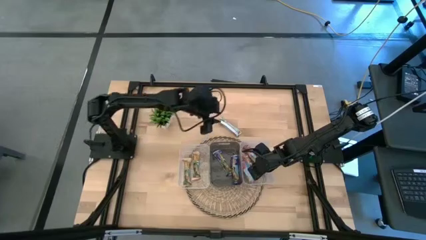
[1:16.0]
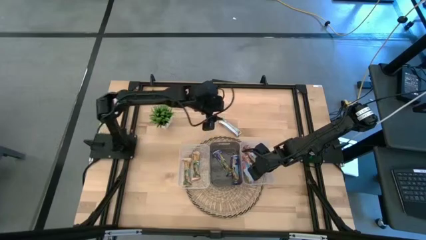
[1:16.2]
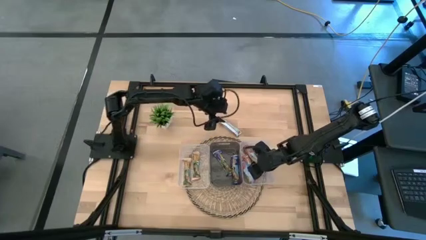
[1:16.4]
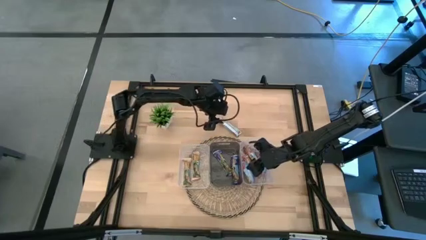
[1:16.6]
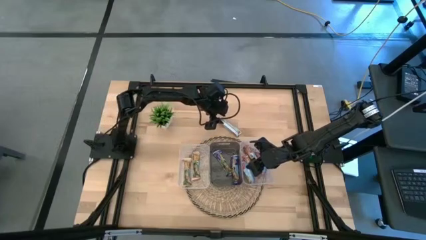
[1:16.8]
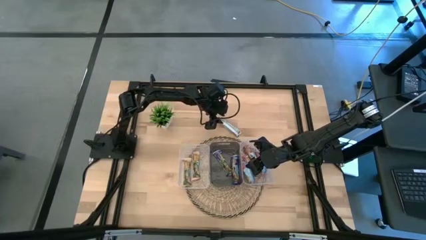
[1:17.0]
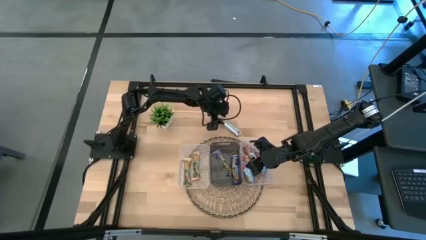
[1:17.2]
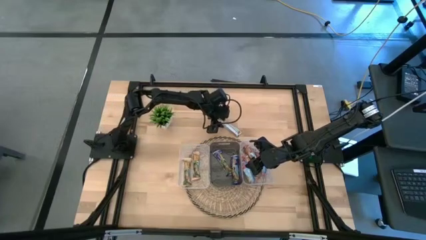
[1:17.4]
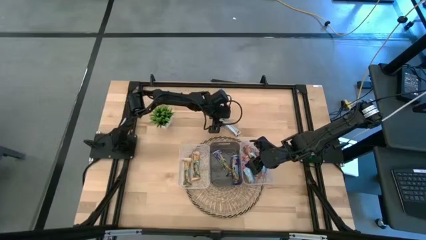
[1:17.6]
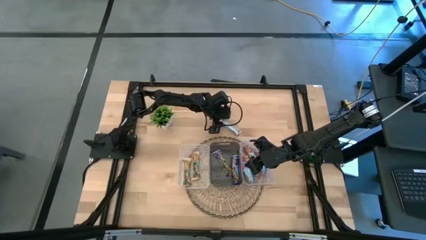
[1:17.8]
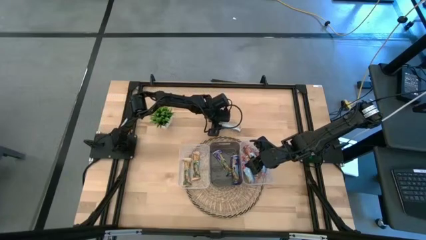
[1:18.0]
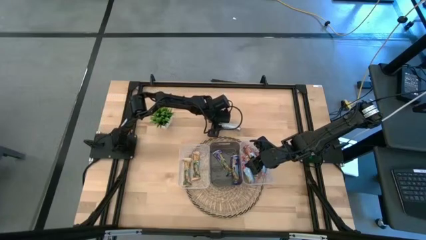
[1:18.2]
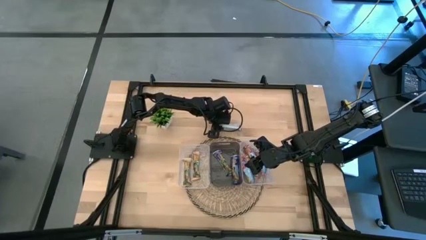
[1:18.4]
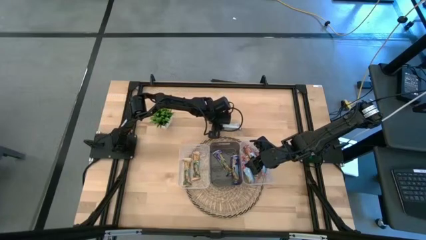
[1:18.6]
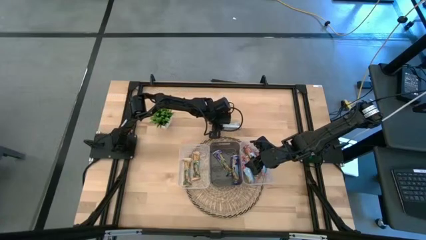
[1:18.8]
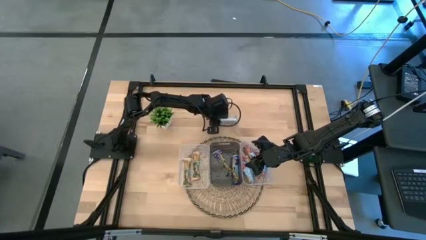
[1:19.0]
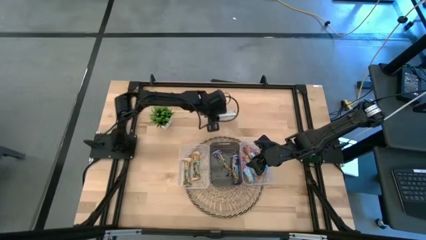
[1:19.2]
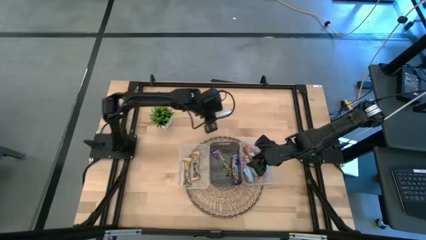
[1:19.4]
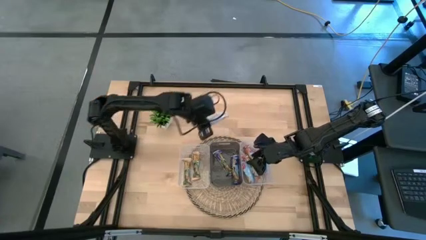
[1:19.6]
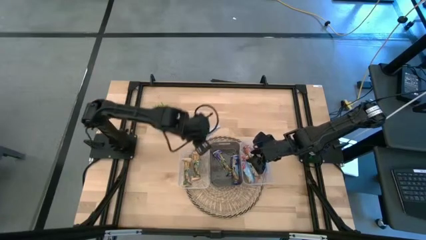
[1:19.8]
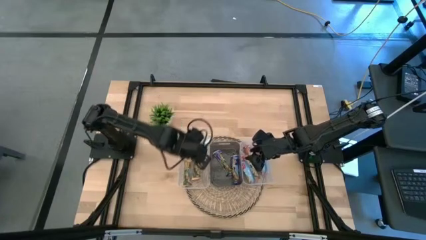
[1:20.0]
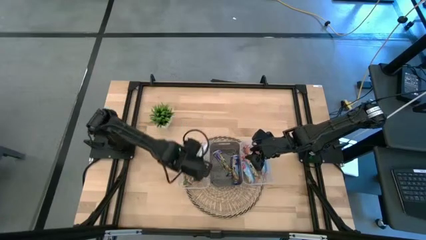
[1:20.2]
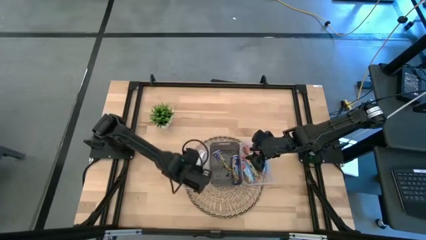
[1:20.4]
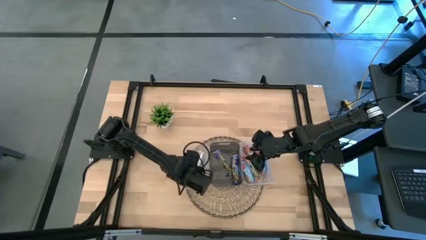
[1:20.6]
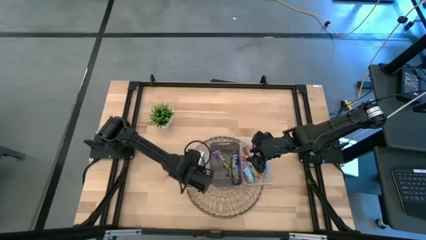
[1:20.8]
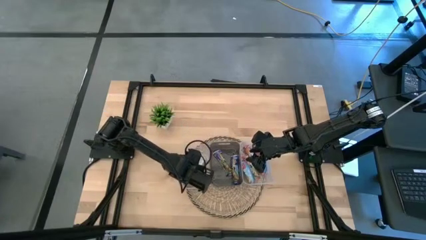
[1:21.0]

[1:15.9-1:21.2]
Task: Pick and place Granola Bars by type
Put the yellow granola bar into the left transparent bin

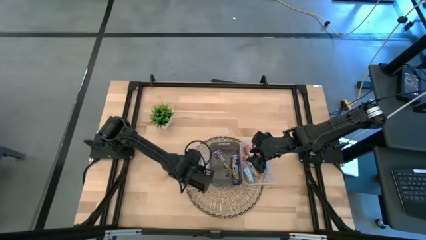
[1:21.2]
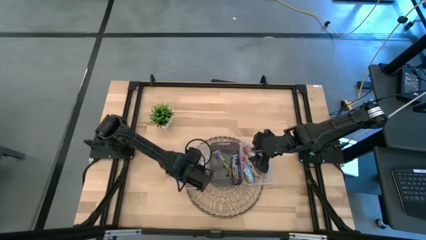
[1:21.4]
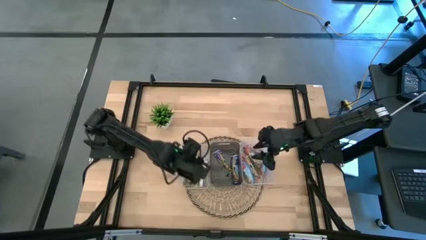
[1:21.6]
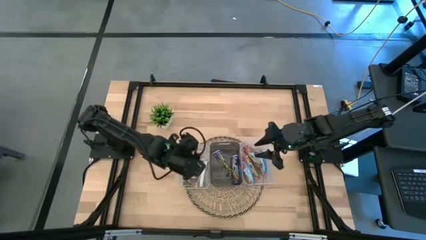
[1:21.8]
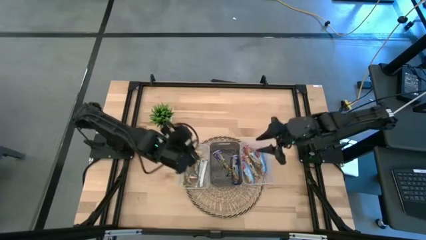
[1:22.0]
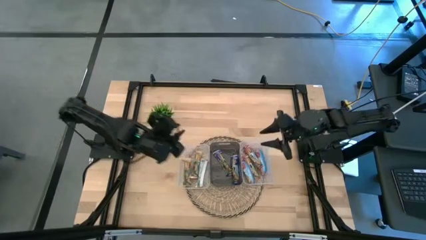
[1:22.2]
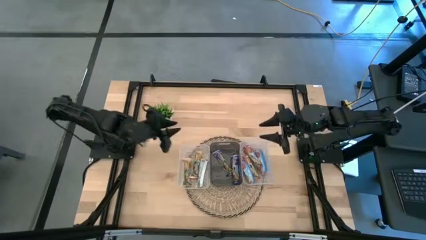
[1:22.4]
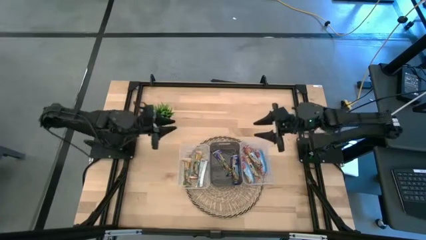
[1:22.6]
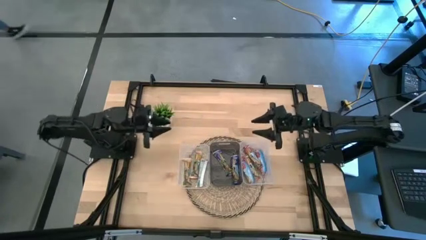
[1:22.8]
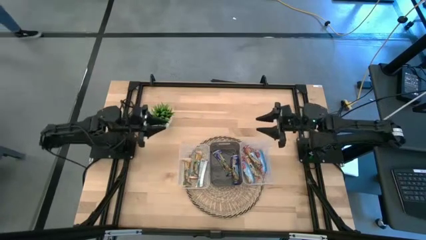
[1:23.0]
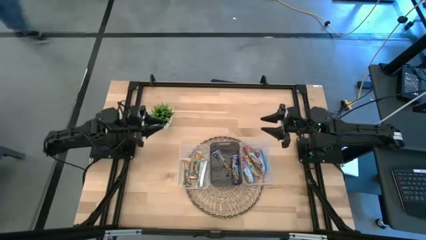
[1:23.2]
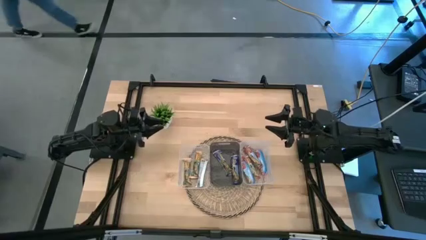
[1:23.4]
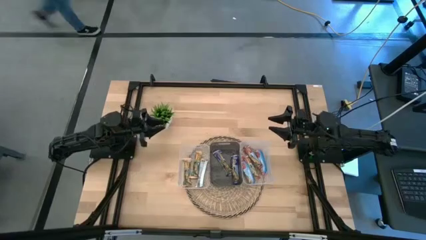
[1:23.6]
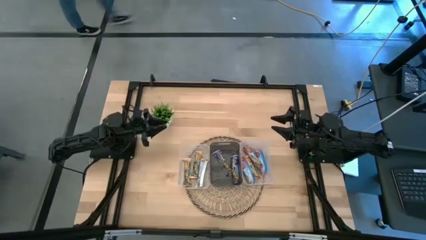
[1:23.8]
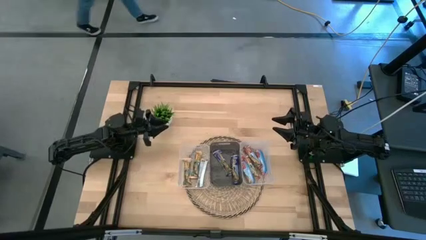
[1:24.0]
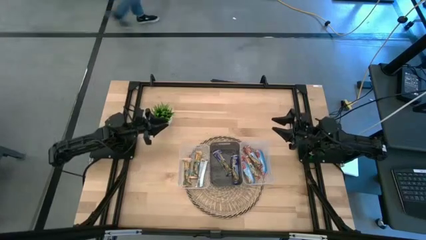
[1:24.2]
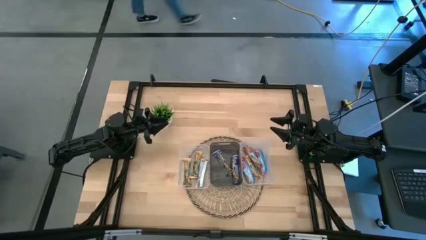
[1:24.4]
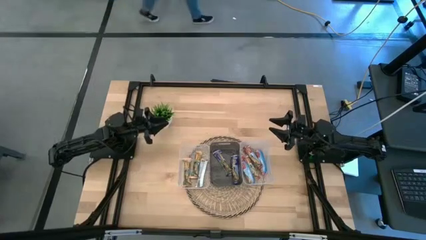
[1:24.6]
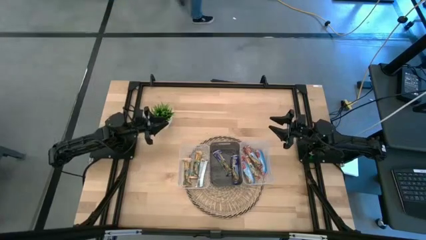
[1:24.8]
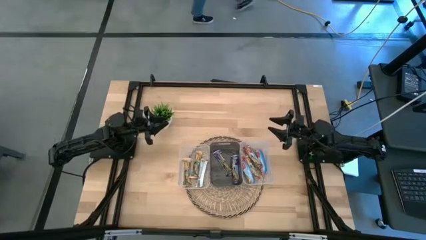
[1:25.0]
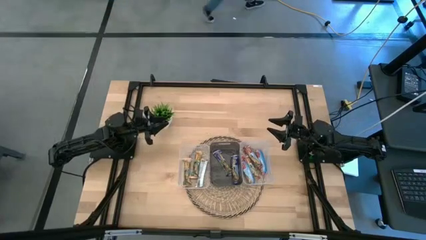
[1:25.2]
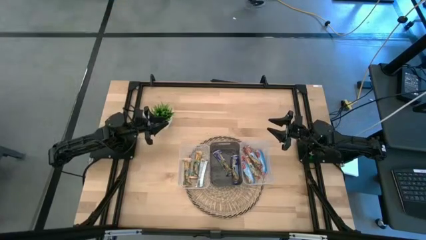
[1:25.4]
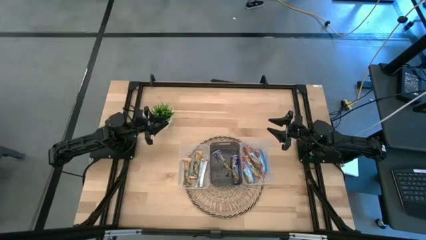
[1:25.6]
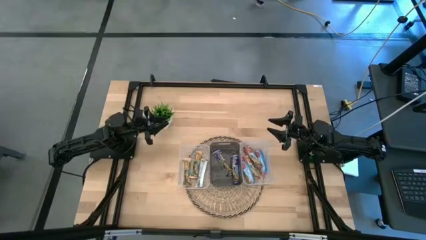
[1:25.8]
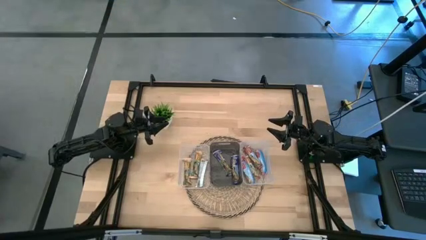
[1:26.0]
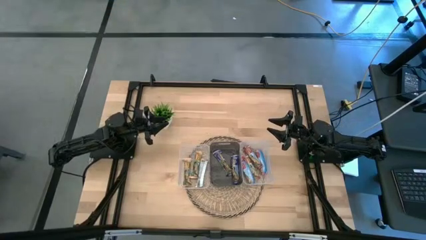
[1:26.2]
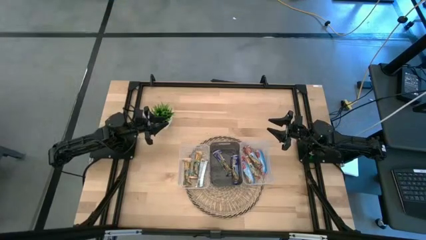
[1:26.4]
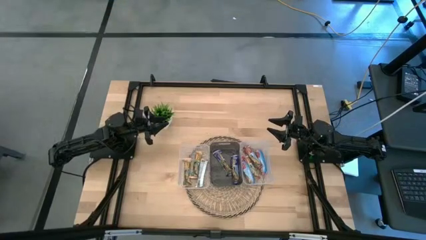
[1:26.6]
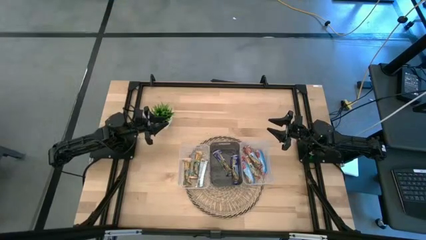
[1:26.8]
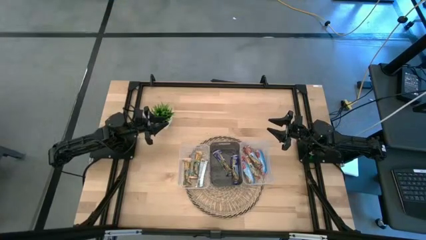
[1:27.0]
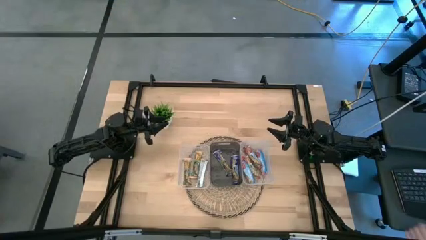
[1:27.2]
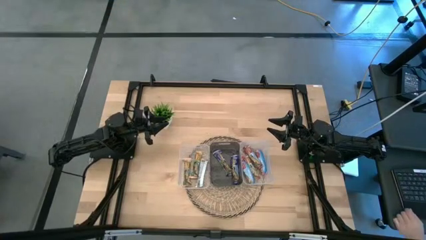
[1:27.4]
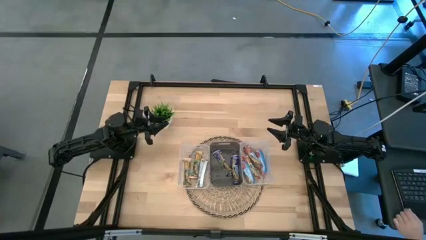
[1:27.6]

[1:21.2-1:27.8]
Return to Home Position

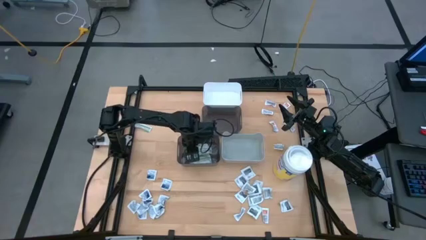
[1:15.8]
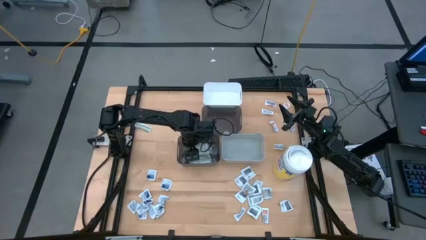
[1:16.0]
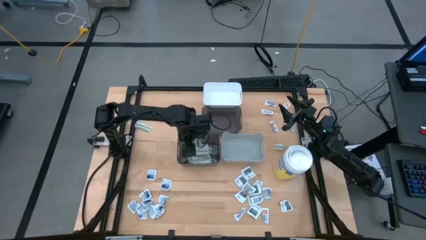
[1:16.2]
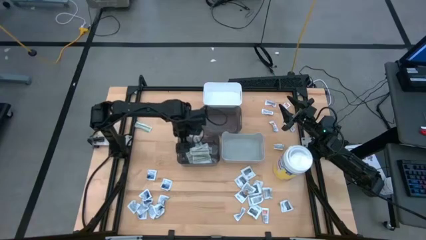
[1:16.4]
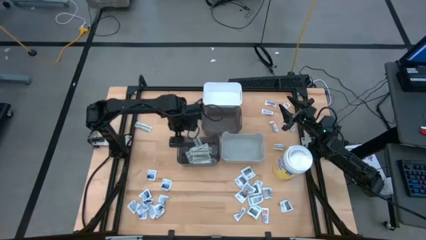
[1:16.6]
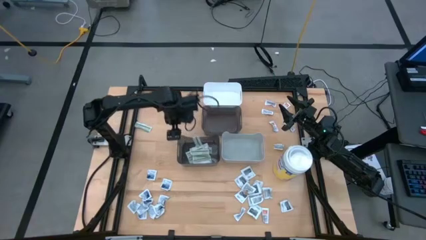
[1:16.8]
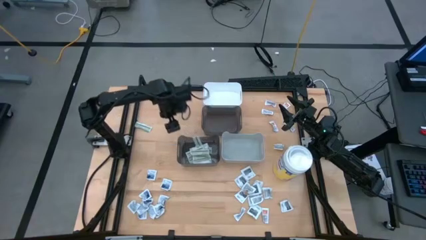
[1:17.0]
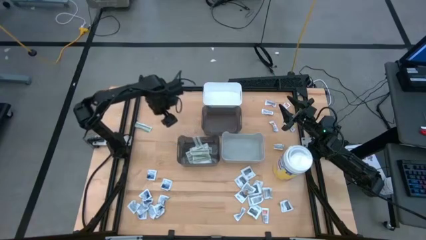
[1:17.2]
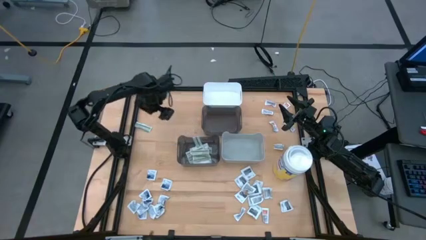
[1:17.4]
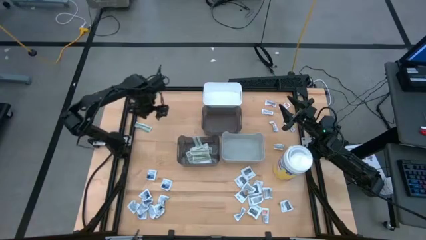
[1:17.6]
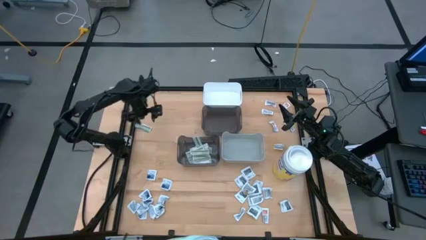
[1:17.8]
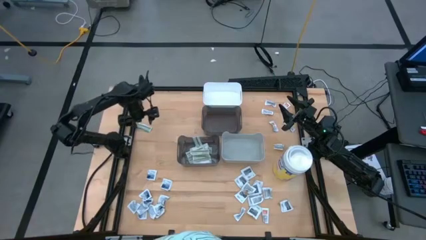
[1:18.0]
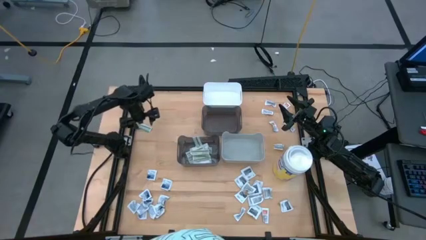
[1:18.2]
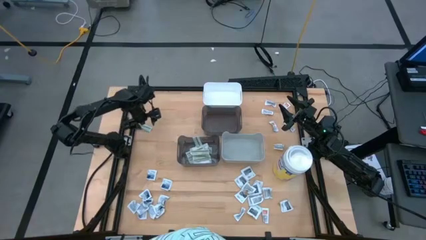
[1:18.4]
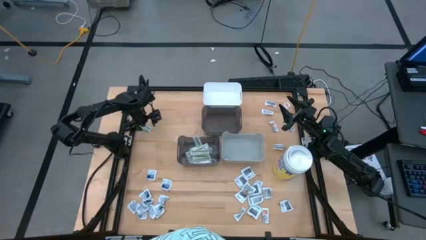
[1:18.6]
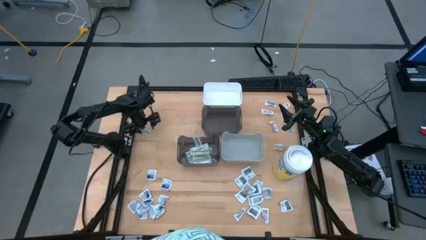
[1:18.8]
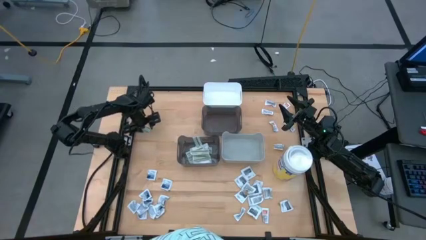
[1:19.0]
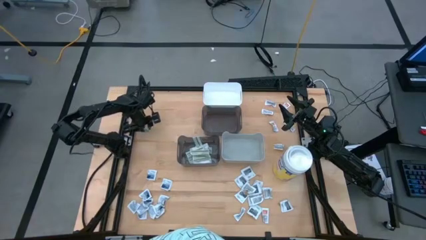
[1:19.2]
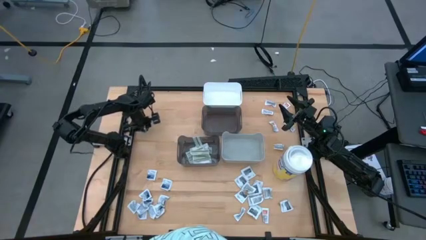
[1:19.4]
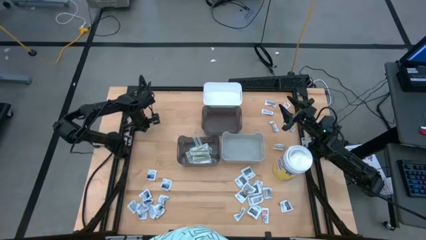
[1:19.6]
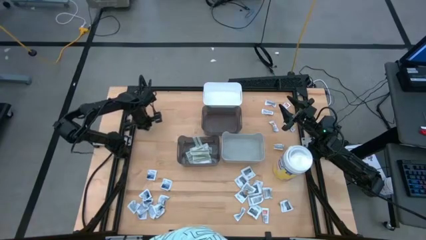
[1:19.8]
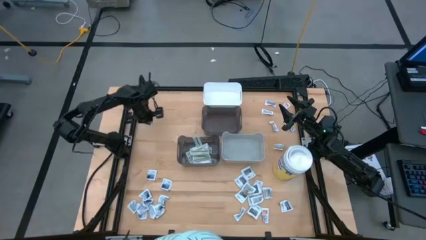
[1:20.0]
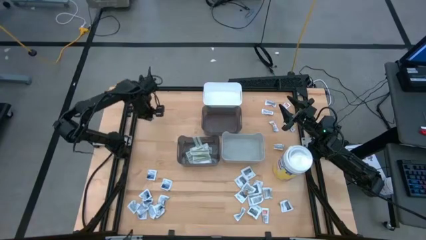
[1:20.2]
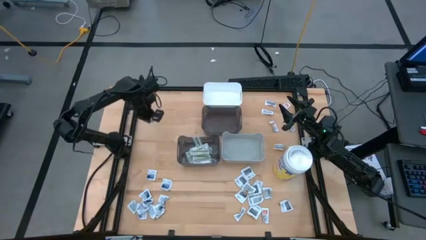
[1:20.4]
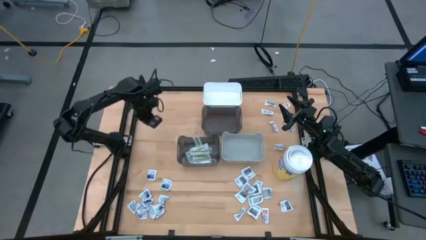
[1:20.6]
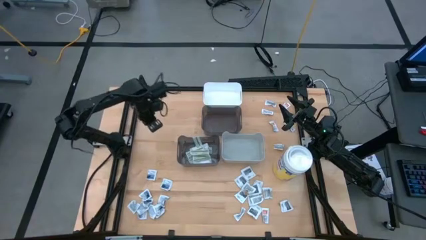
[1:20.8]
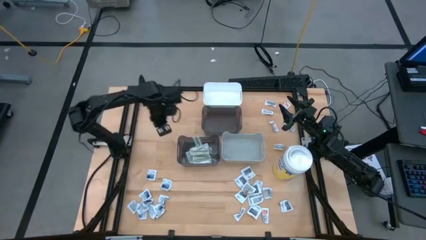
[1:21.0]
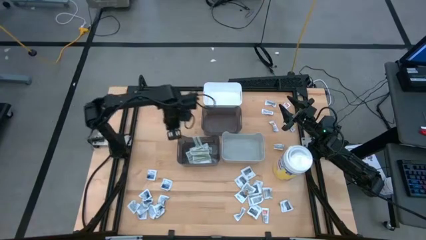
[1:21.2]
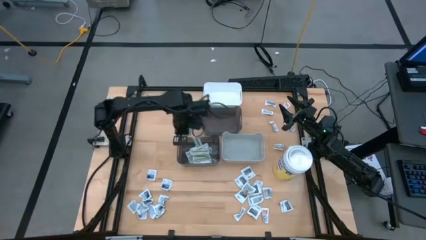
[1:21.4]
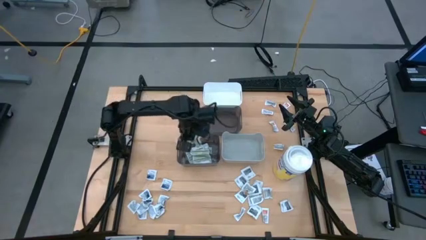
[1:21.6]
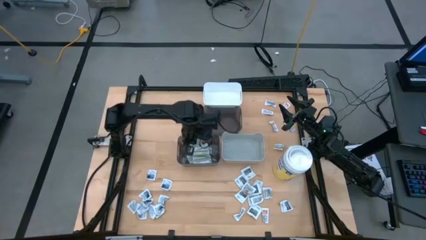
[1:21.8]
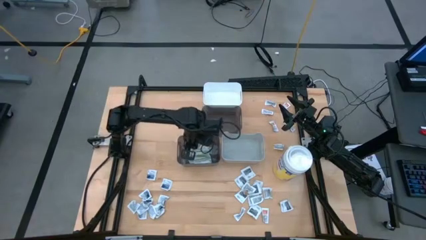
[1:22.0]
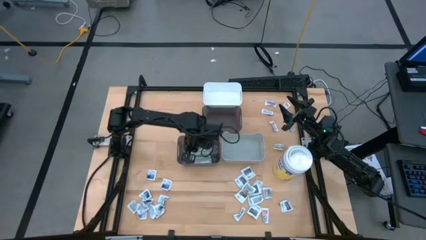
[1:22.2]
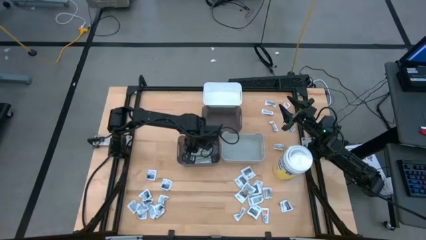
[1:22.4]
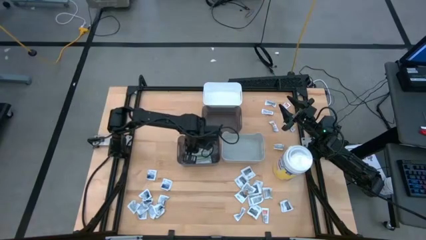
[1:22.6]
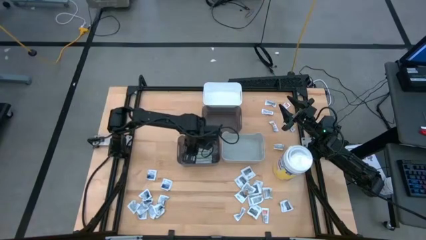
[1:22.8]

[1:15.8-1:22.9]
Task: Pick & Place First Aid Supplies
Put the white bandage into the bottom black bin
